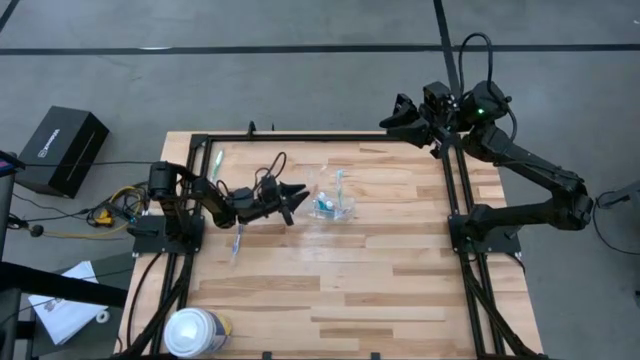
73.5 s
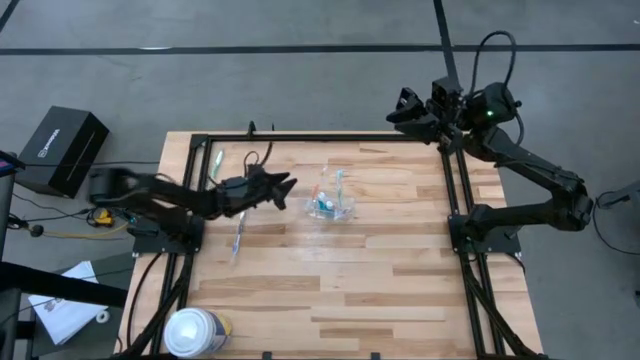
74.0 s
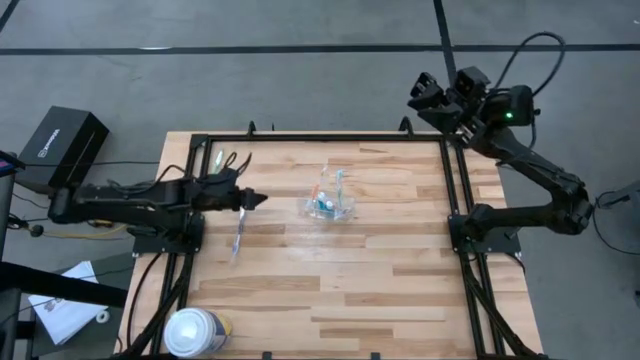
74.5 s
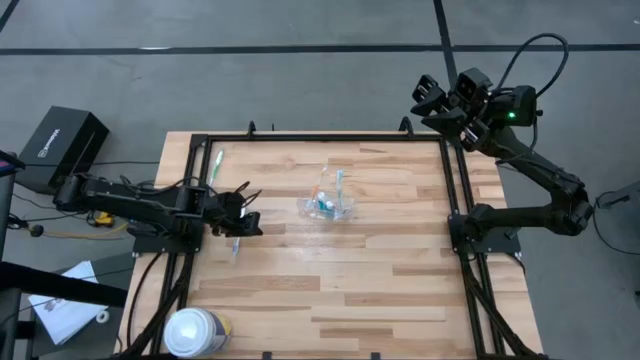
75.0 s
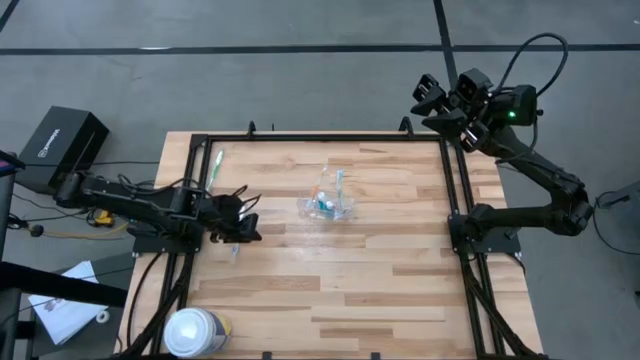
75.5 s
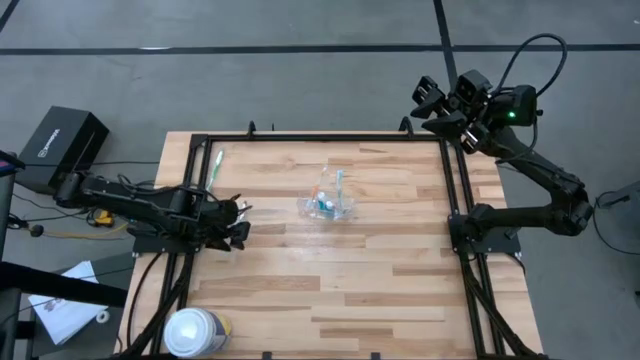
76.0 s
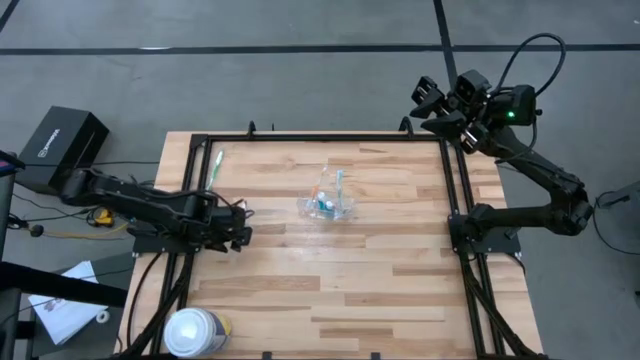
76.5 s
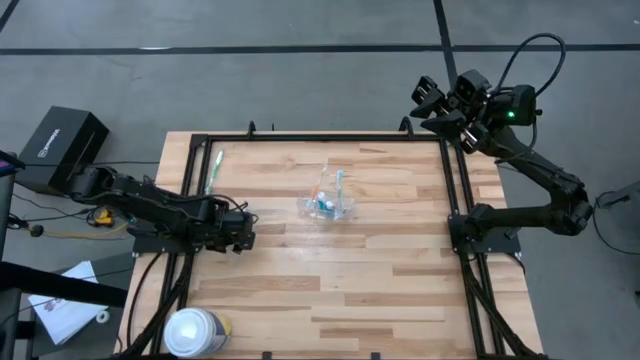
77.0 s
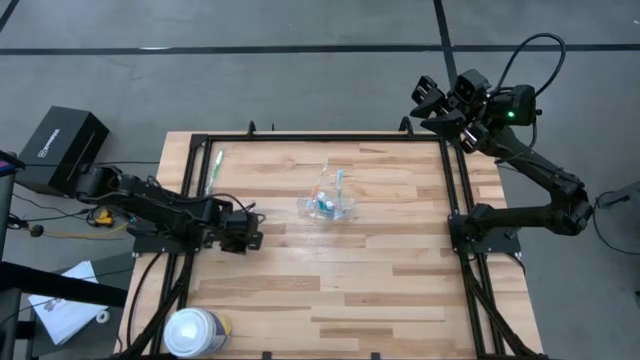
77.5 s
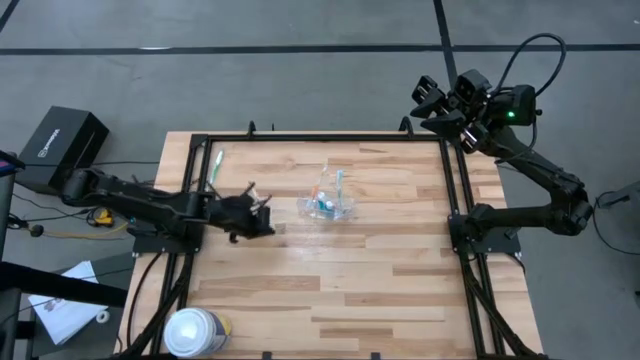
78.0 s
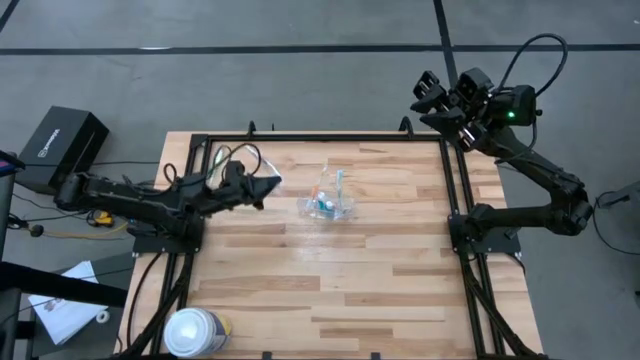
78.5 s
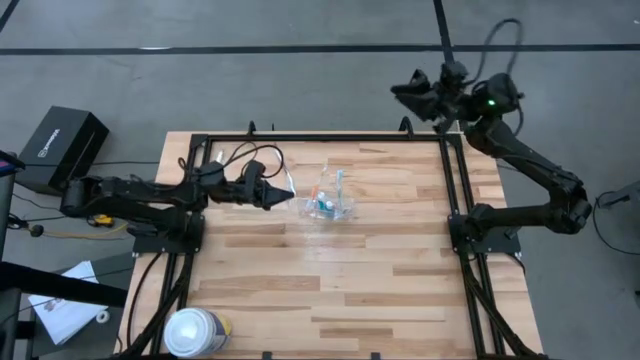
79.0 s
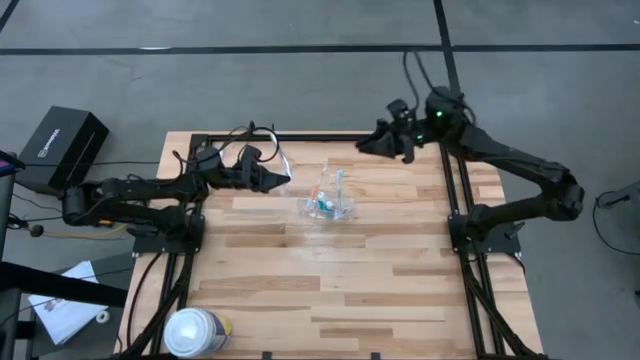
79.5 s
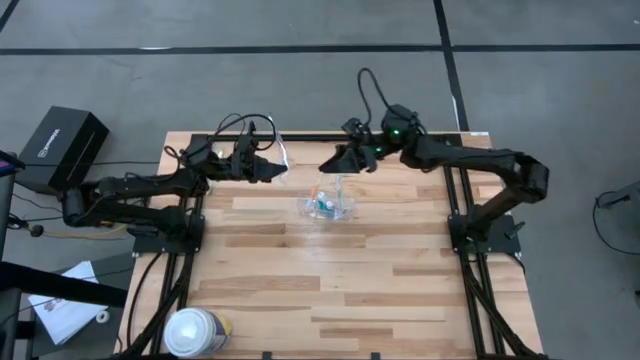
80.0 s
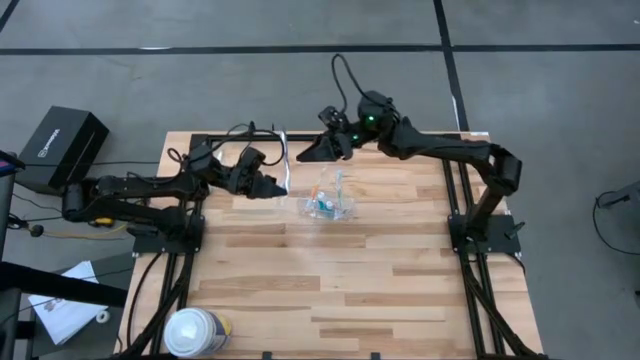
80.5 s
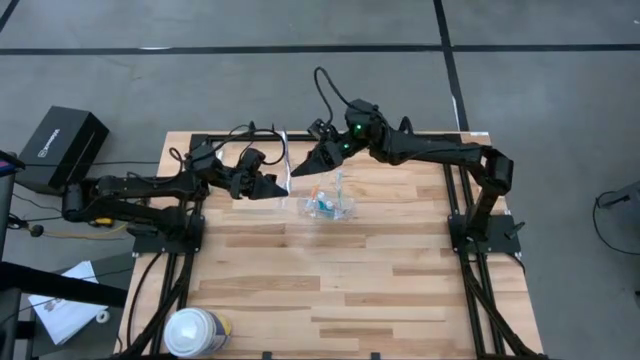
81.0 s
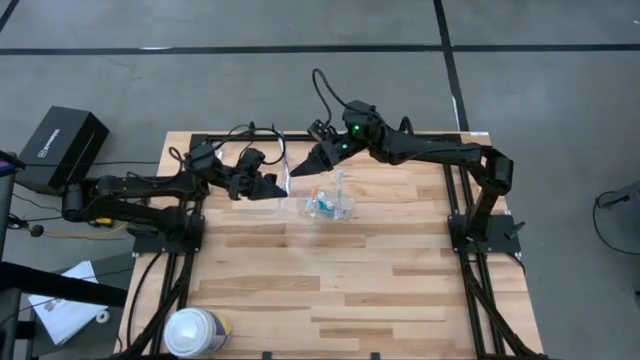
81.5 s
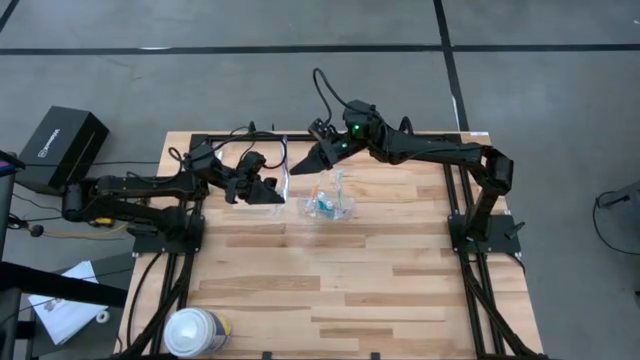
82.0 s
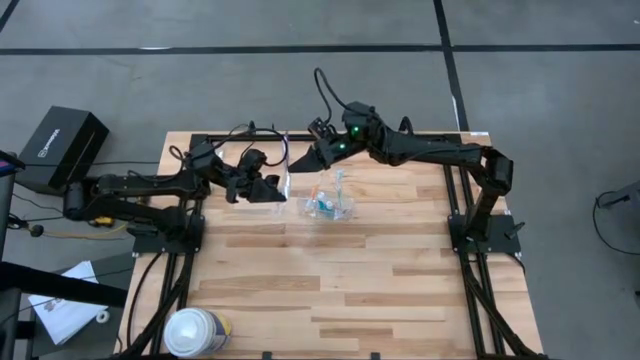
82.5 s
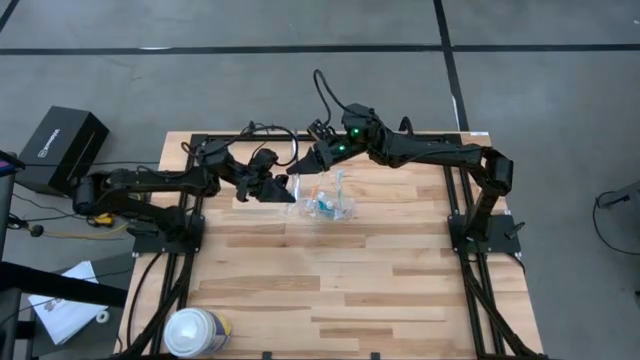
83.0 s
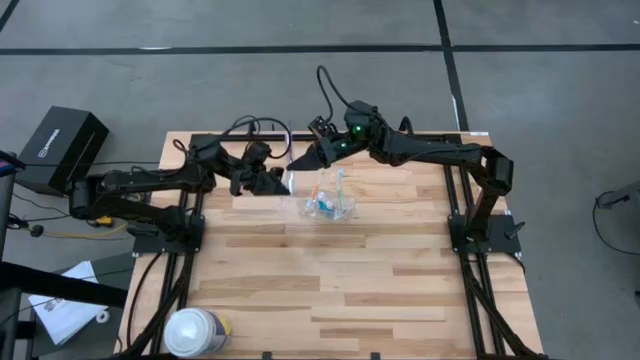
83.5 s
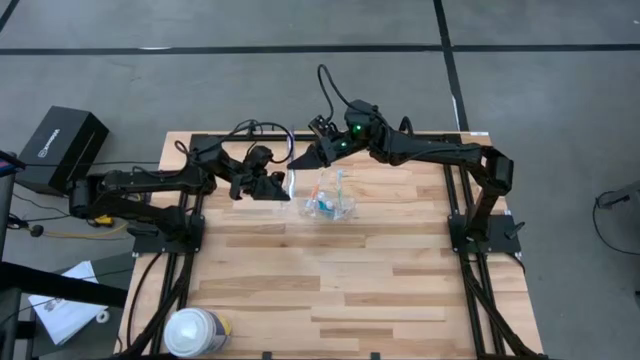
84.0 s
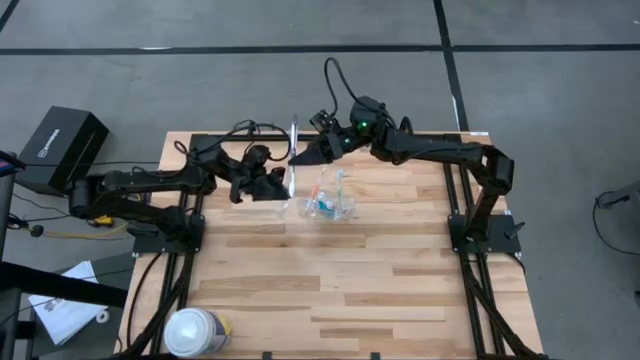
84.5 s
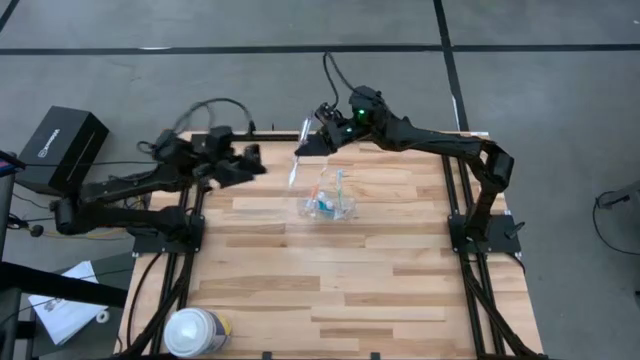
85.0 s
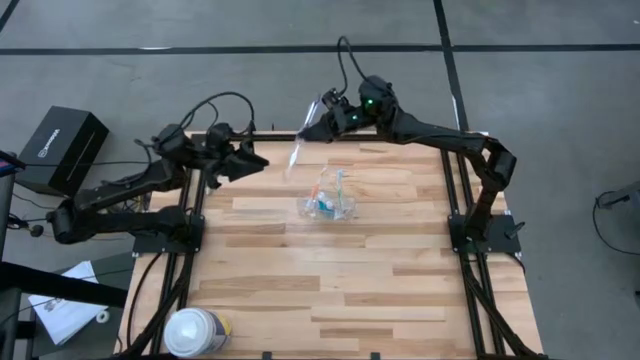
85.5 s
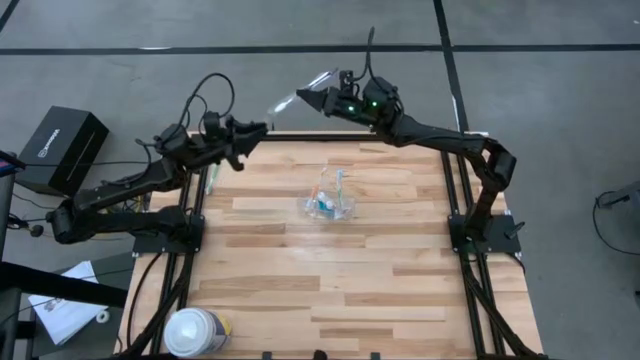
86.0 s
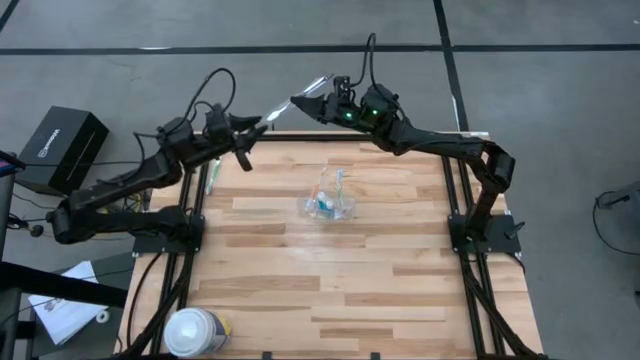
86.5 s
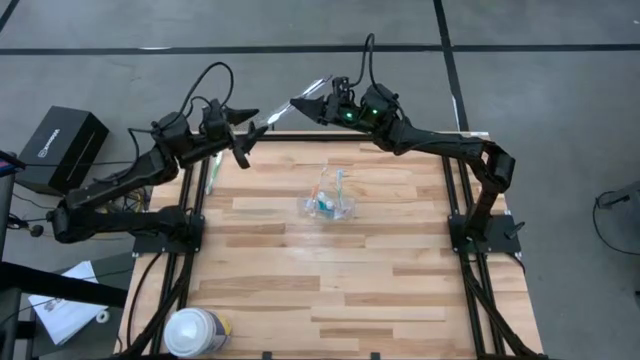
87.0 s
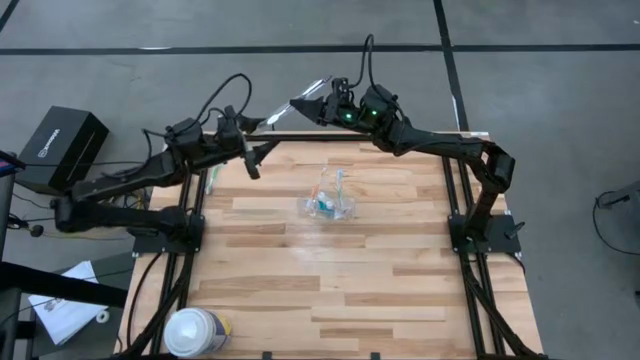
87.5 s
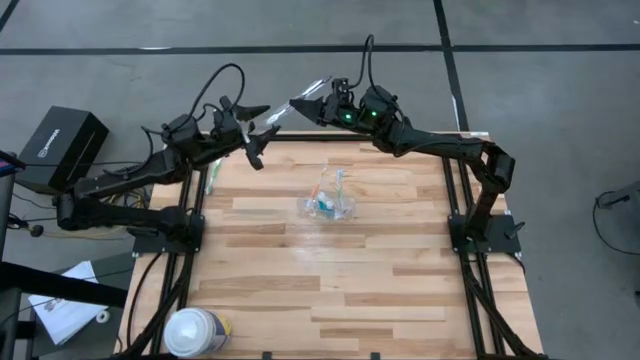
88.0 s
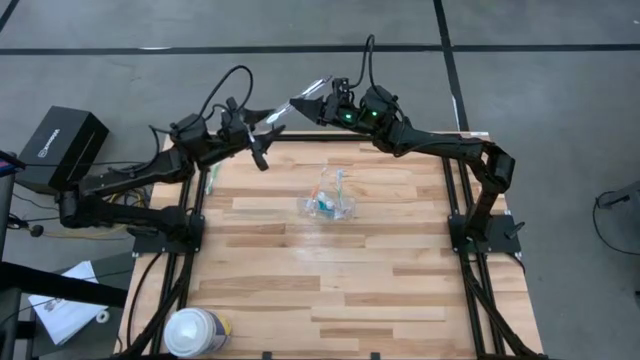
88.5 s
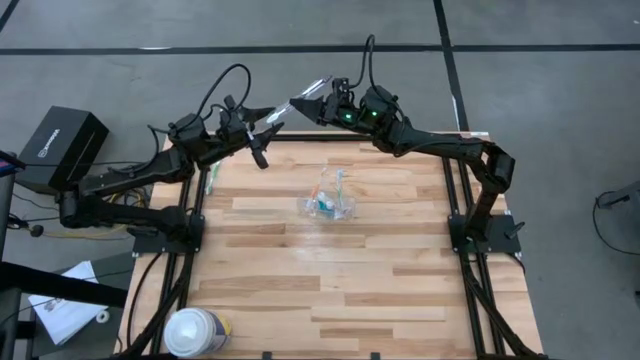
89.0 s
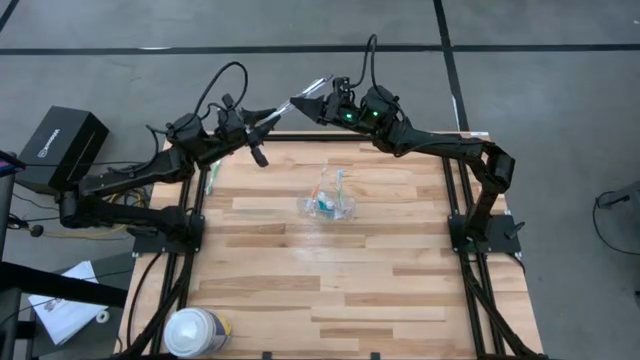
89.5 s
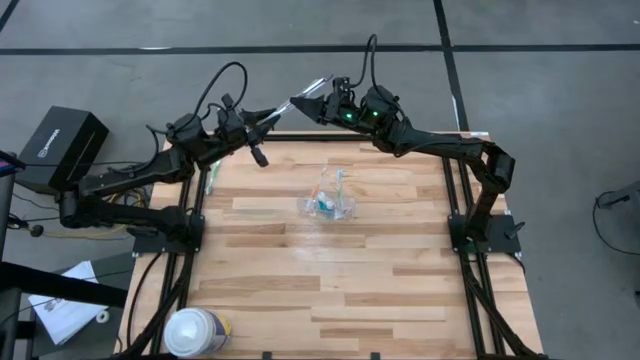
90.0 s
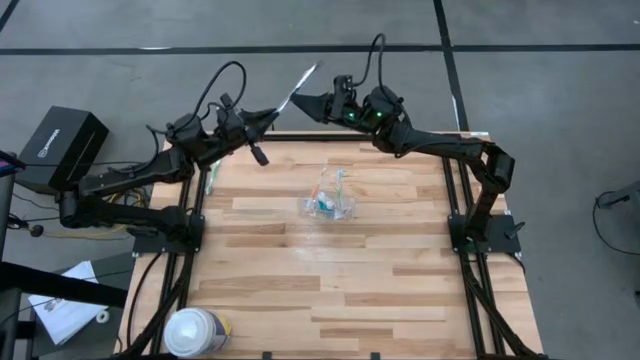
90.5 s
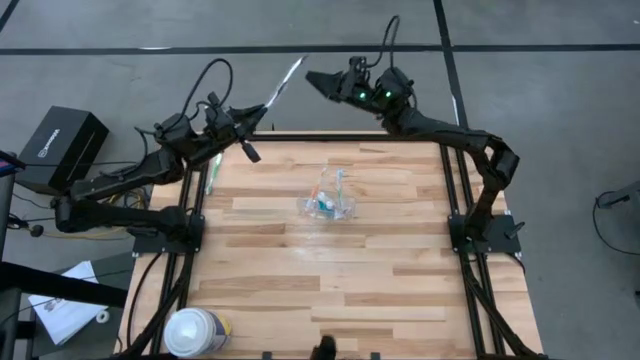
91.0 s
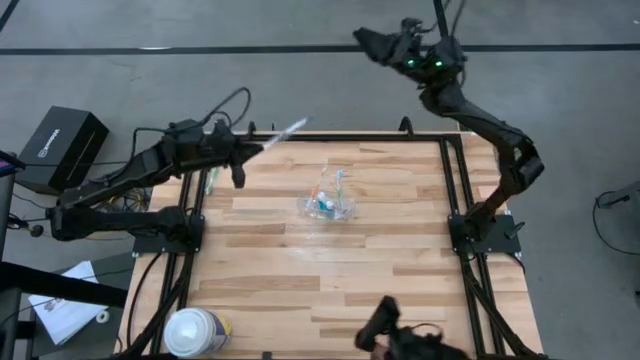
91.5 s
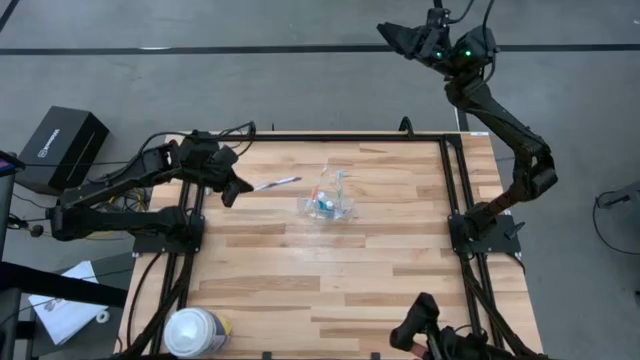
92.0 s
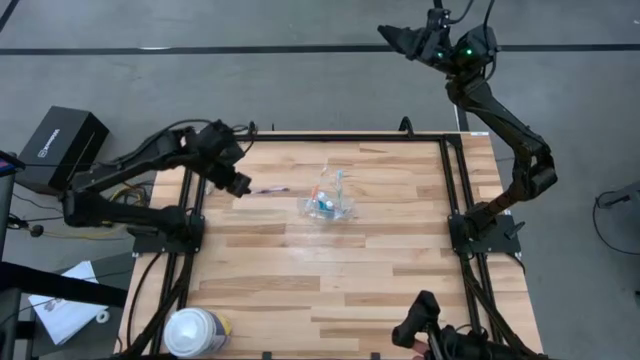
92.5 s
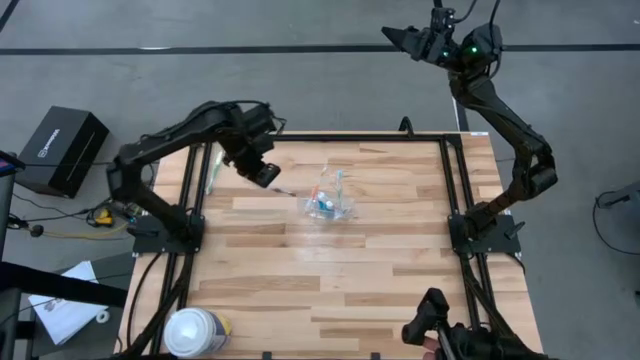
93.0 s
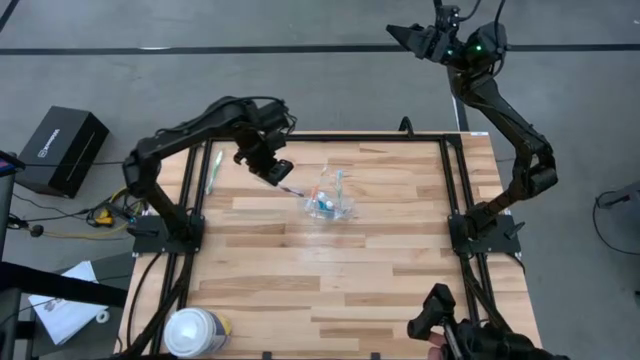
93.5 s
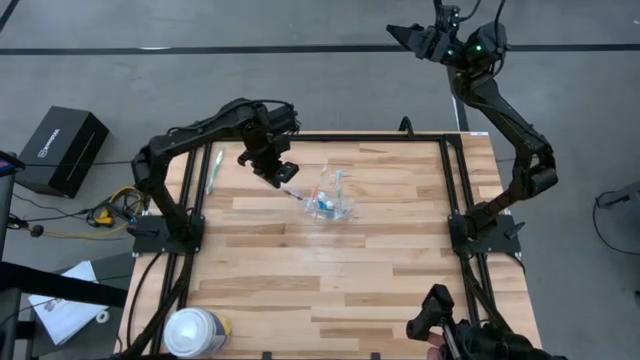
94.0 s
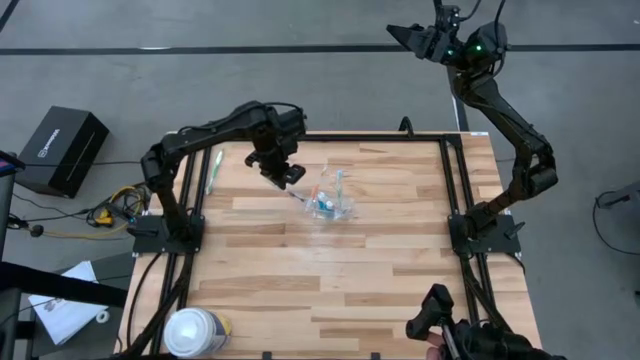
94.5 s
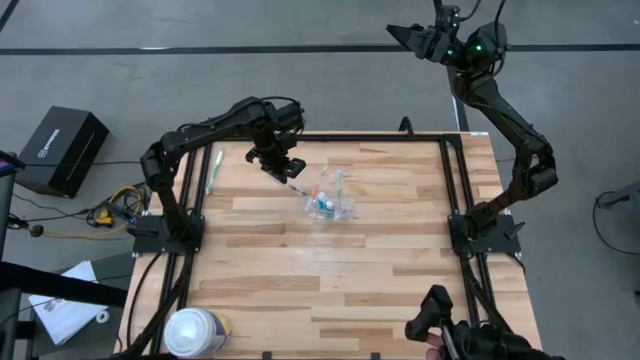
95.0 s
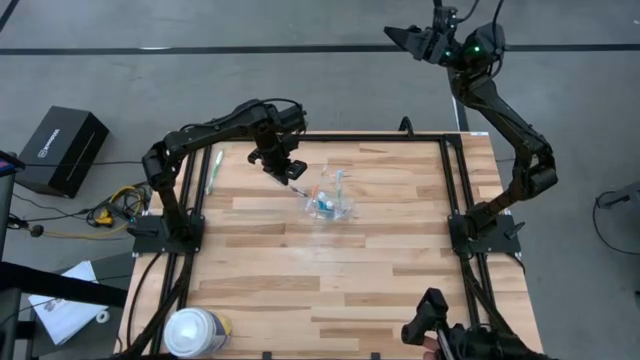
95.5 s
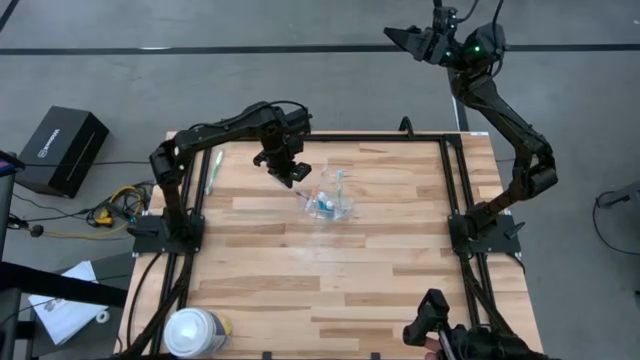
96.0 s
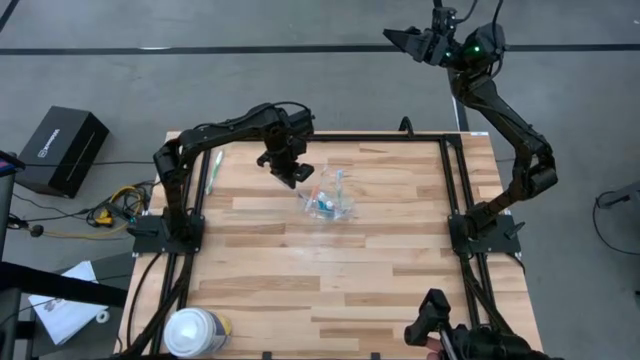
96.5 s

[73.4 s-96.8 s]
Task: Pick & Place toothbrushing station
Put the purple toothbrush into the transparent organizer
